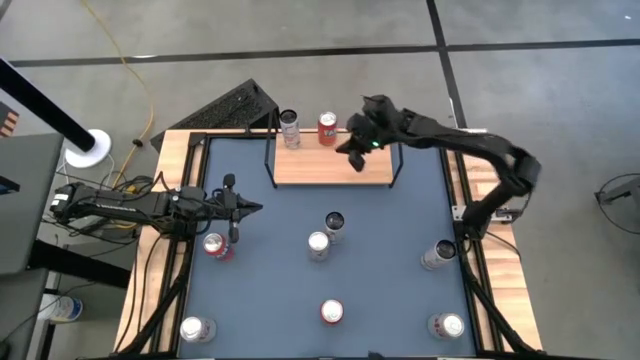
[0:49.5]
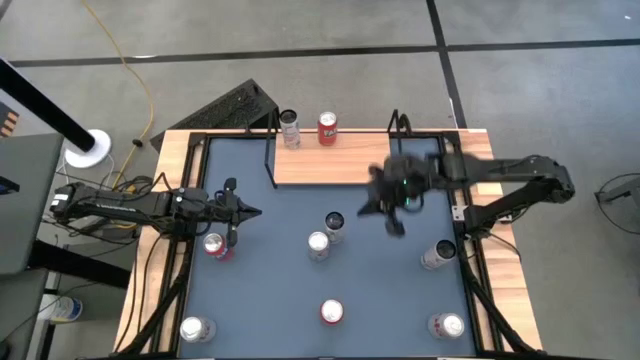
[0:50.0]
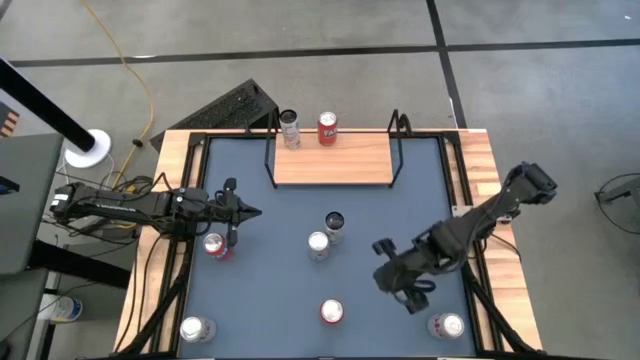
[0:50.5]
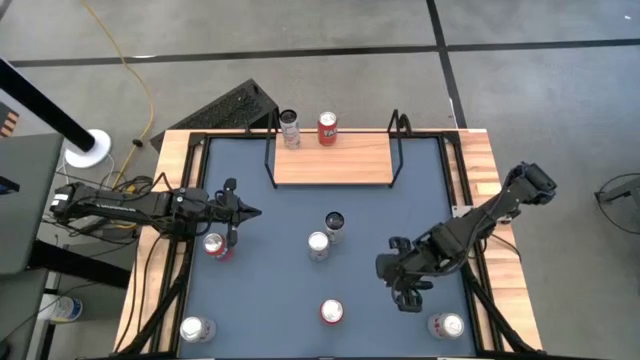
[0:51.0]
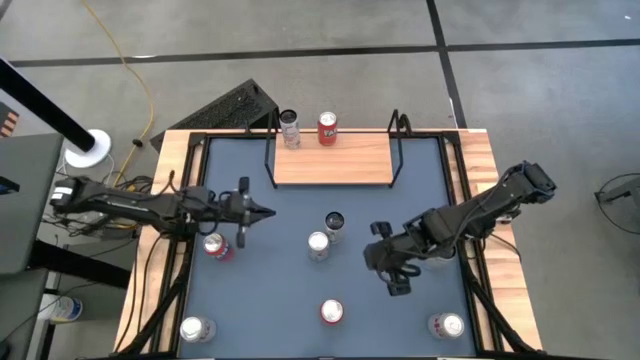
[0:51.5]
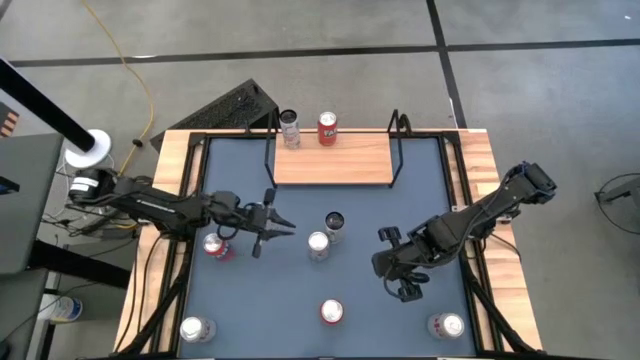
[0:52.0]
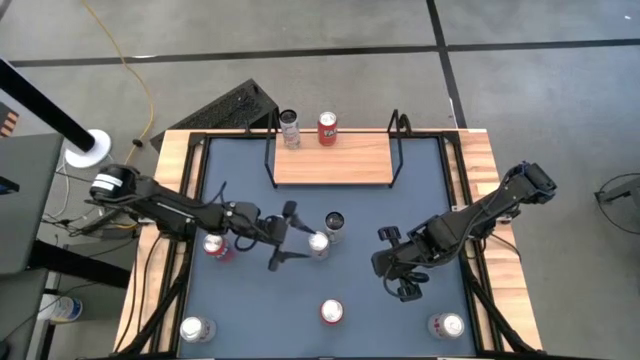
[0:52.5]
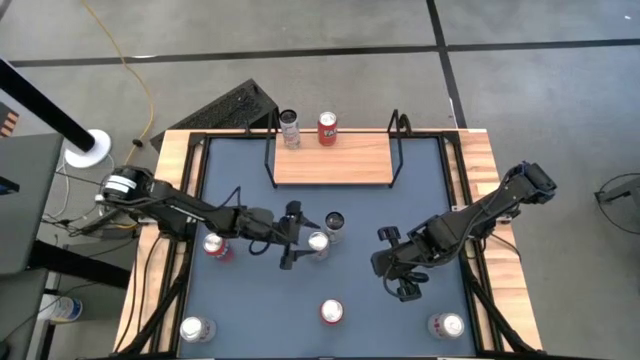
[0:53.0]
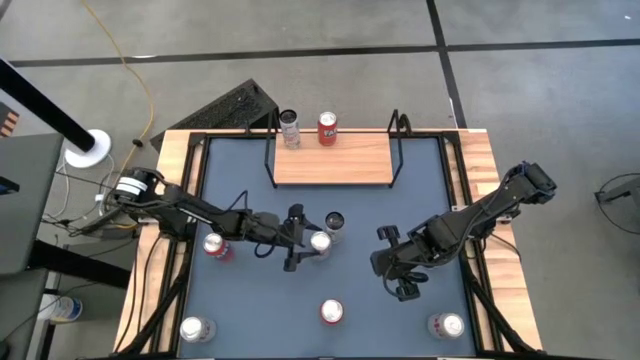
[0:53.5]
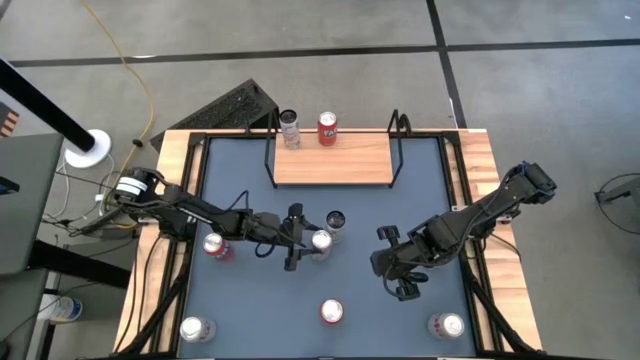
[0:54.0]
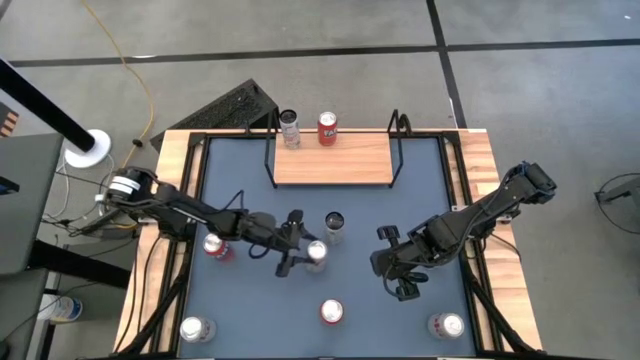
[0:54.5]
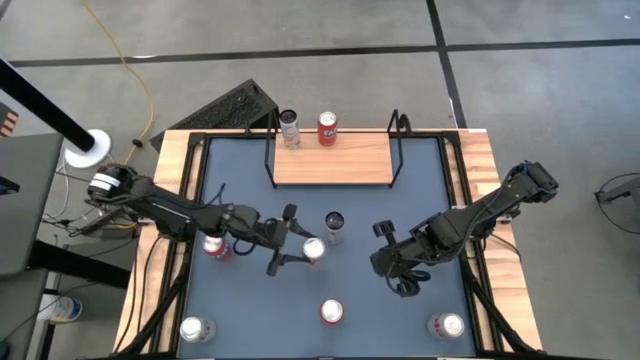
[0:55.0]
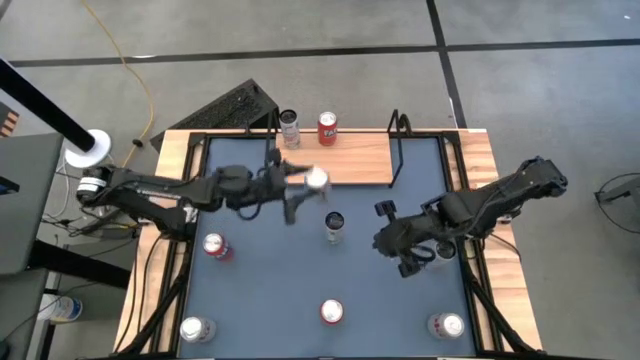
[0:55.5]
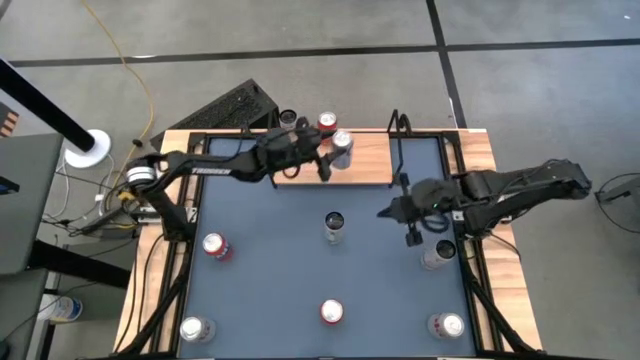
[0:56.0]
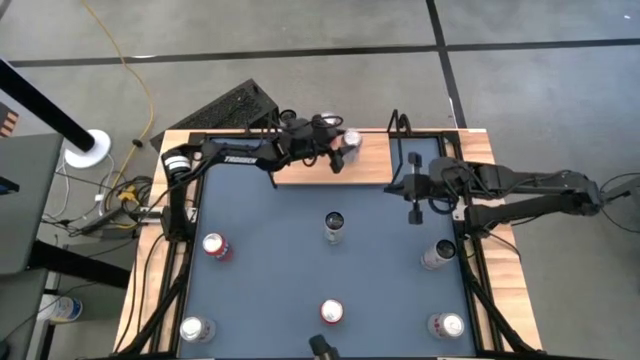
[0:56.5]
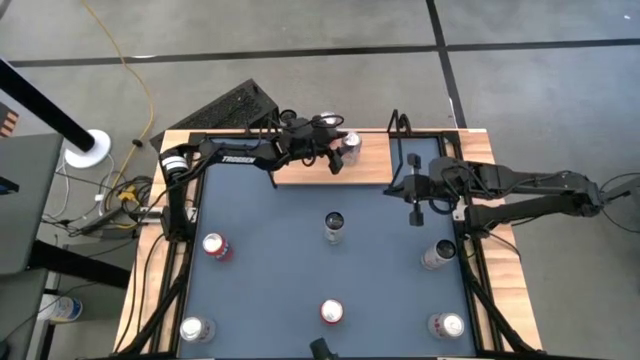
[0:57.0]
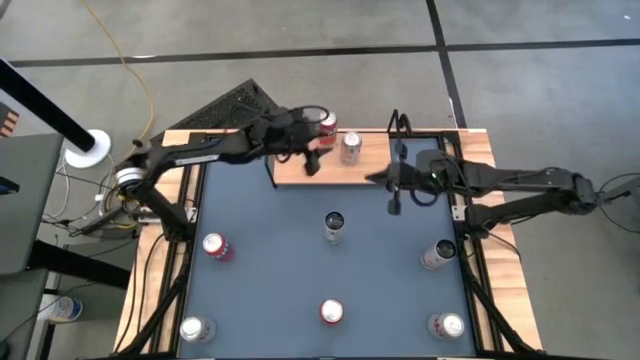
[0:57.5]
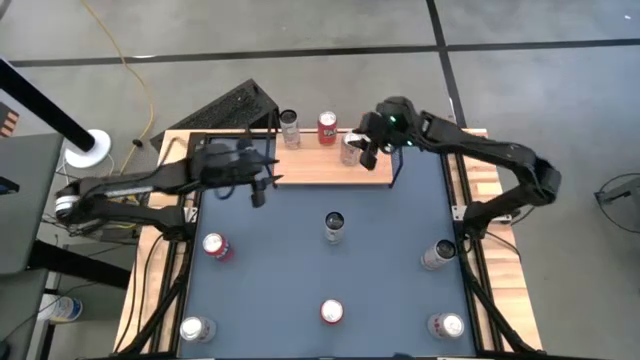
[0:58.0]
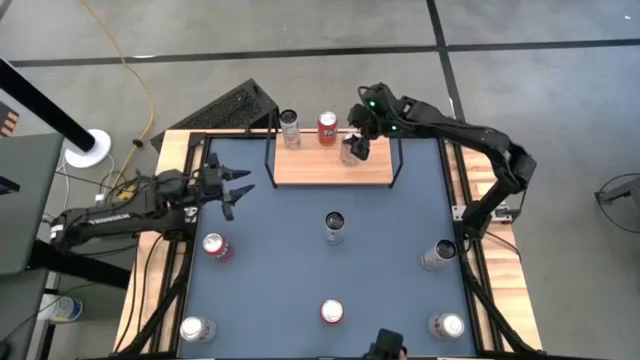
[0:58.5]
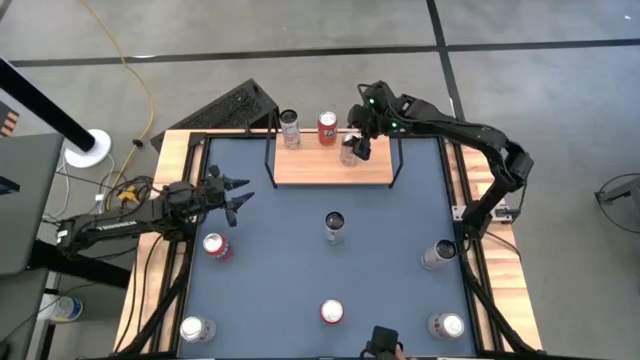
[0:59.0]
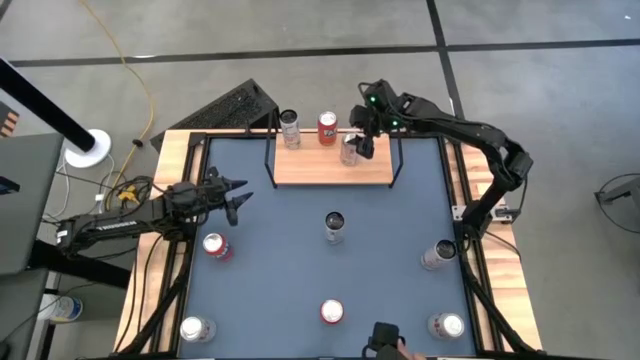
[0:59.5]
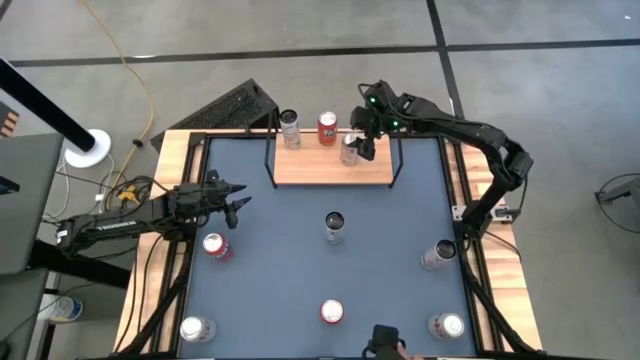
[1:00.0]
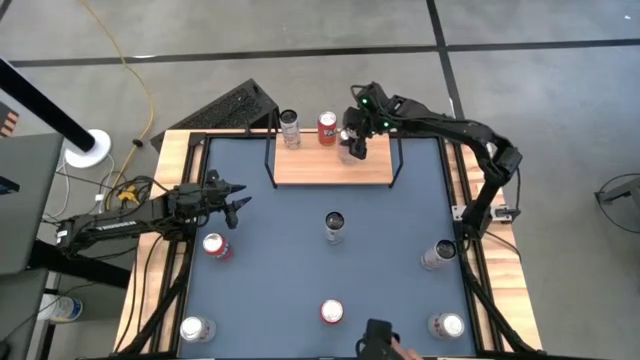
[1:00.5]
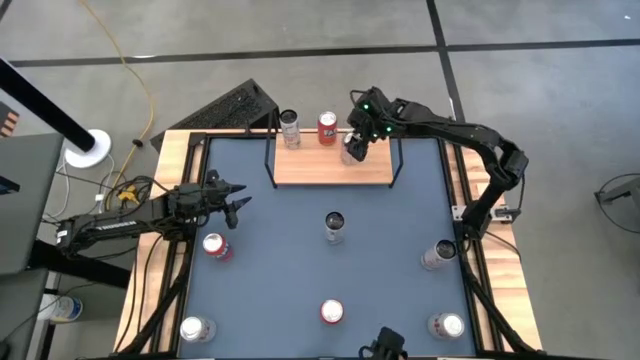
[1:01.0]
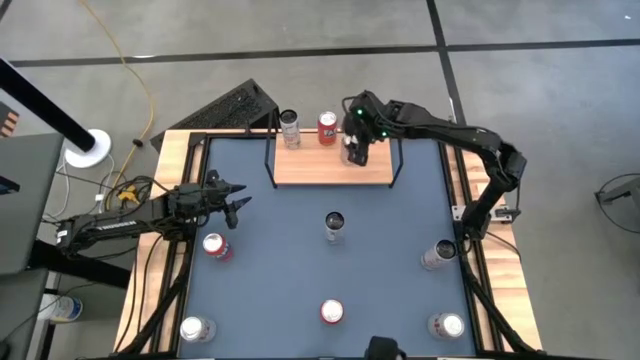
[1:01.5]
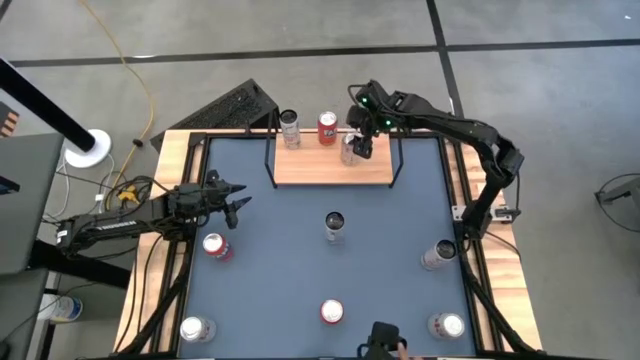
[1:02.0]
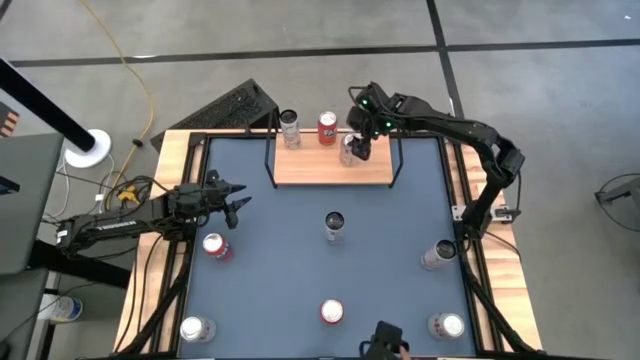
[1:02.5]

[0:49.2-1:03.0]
Task: Place canned beverage on shelf
Put the top red-silver soda can on the shelf

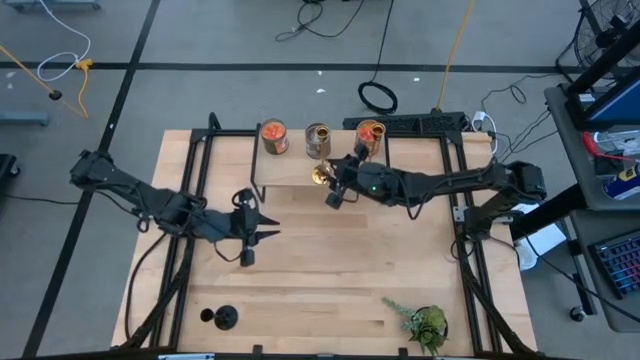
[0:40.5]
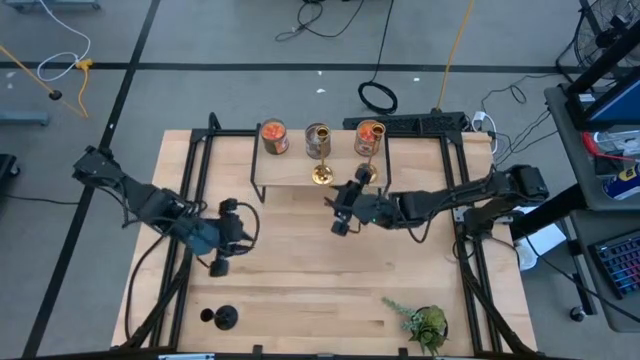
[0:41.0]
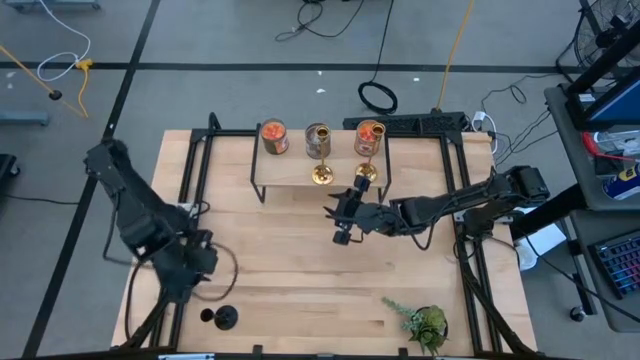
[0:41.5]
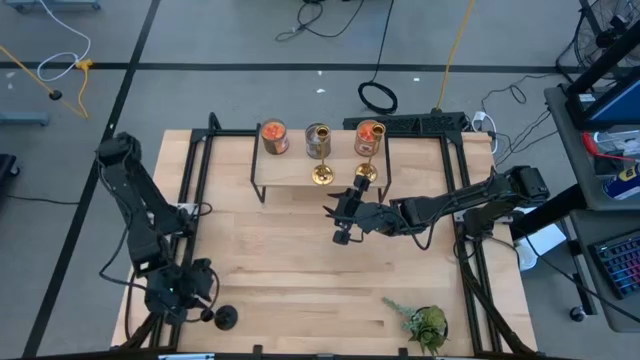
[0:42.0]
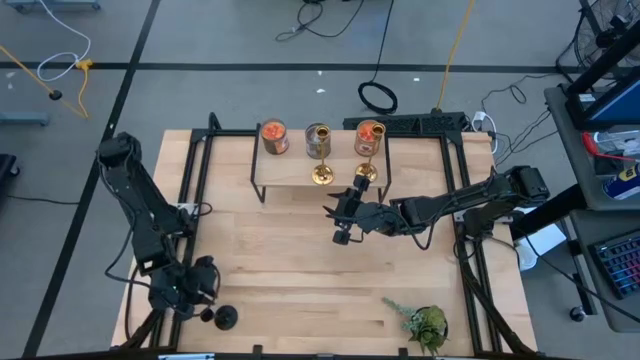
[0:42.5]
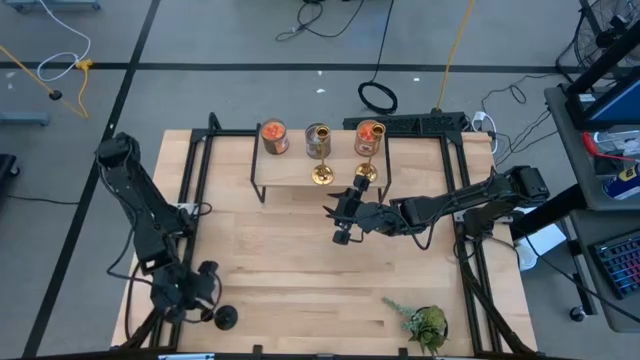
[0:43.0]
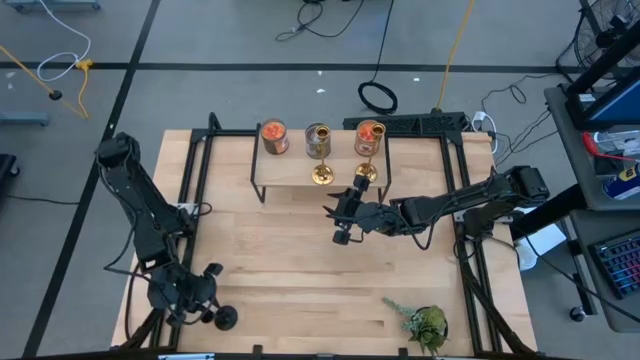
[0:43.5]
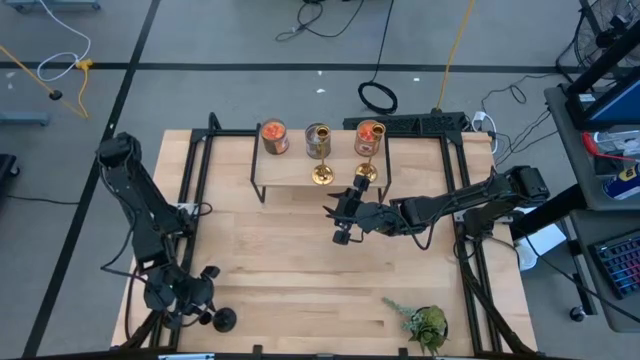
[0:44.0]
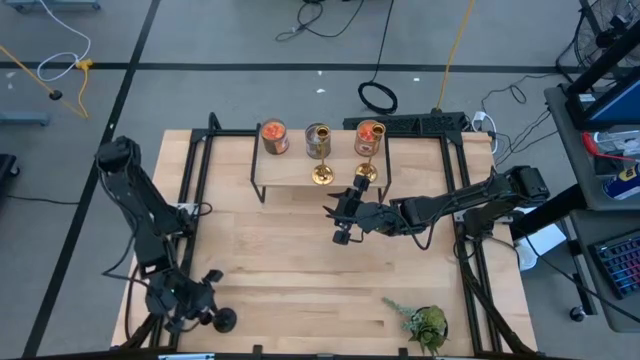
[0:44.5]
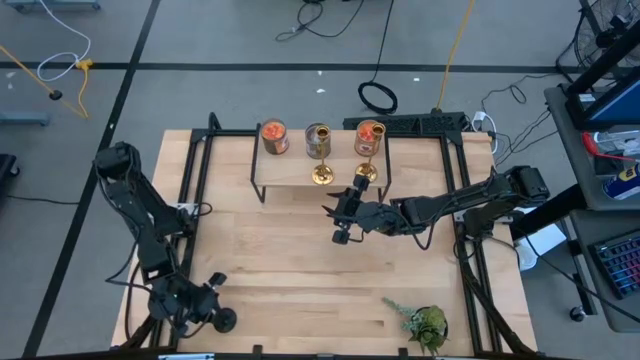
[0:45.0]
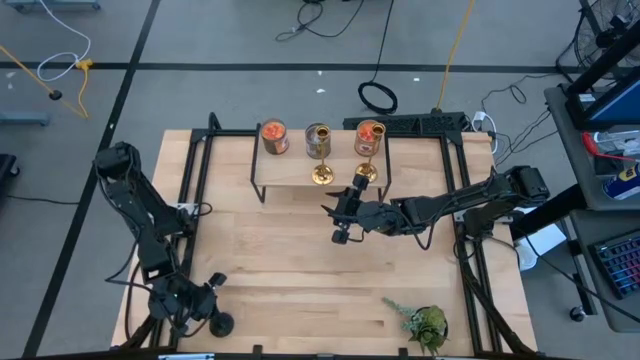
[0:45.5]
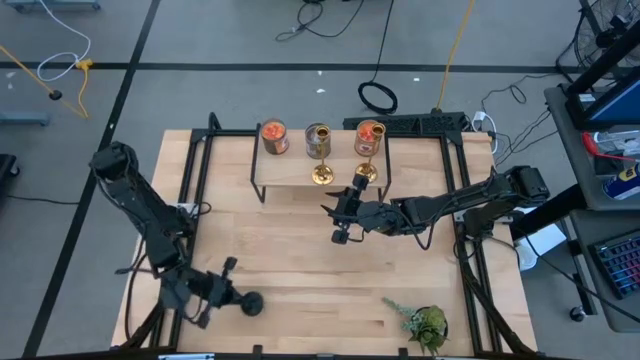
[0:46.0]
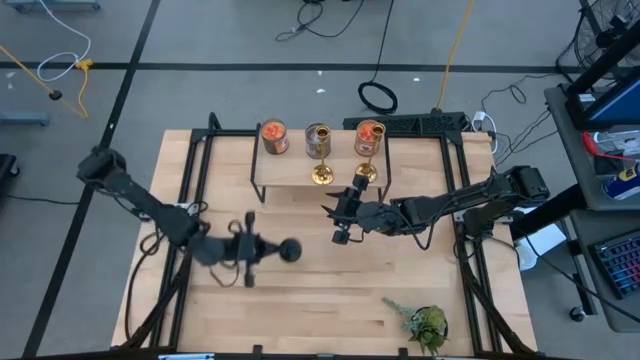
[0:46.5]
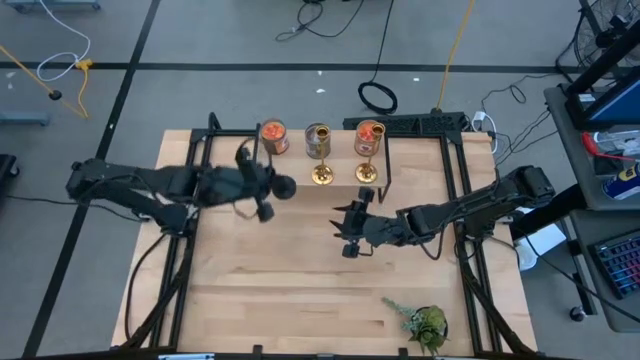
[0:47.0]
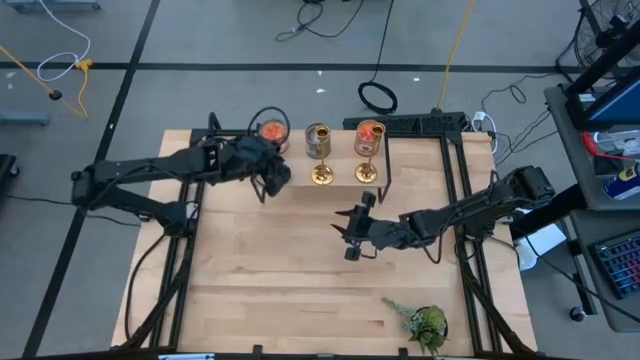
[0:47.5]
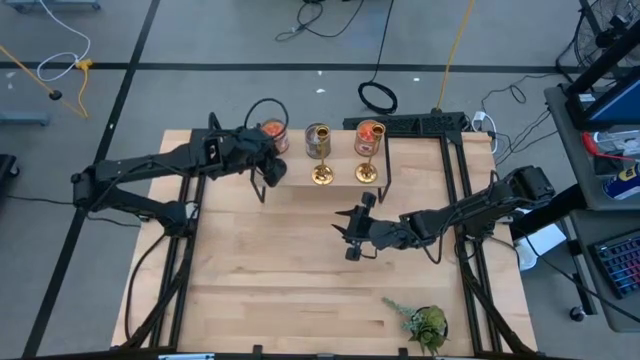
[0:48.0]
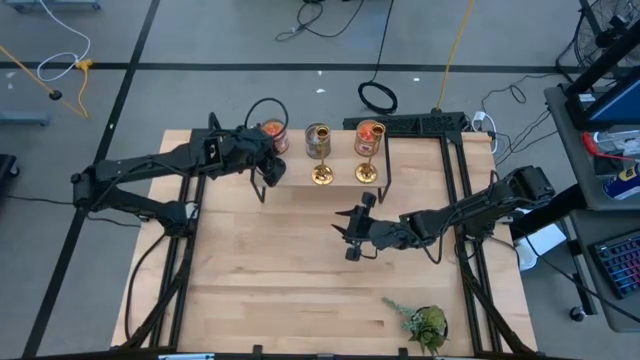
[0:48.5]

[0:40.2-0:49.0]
Task: Pick & Place candle stick holders
Put the black candle holder on the shelf

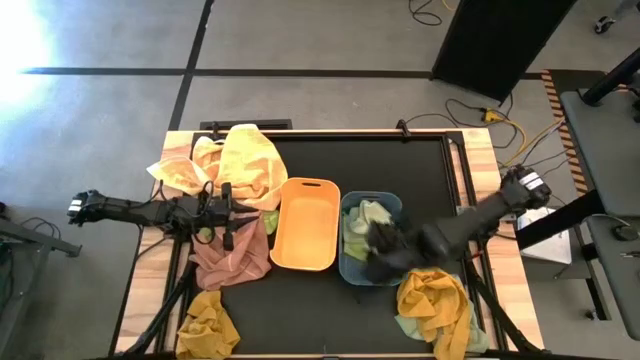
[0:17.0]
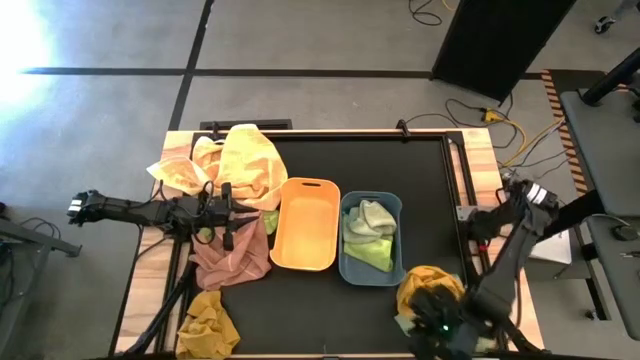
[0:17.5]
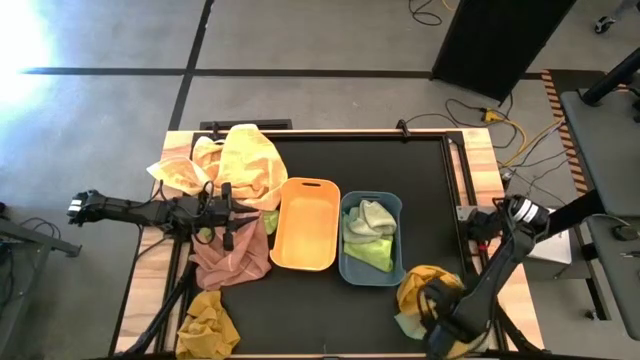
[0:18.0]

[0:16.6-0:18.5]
Task: Sort towels by color in basket
Put the orange towel into the orange bin
